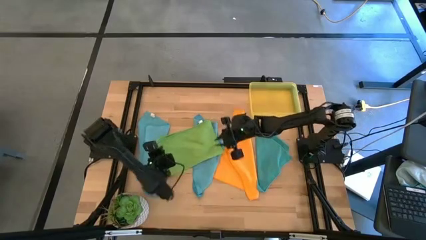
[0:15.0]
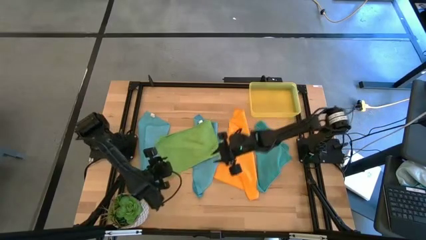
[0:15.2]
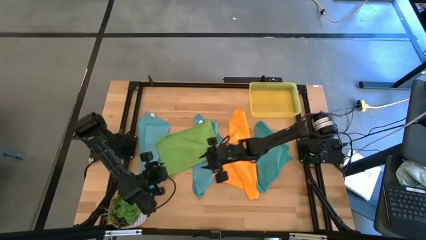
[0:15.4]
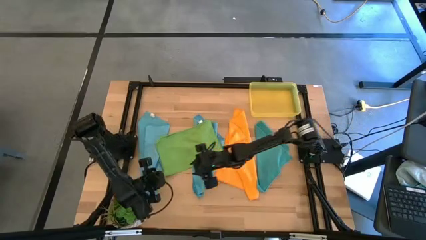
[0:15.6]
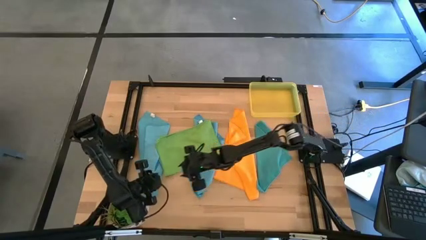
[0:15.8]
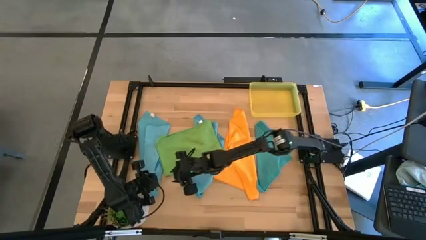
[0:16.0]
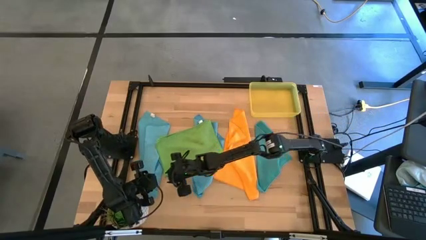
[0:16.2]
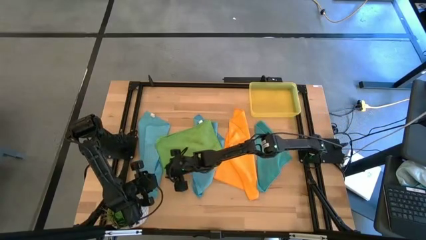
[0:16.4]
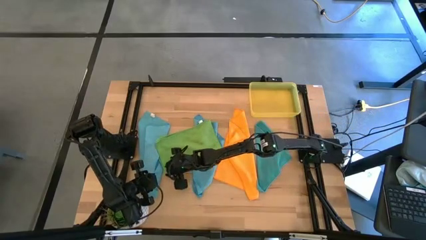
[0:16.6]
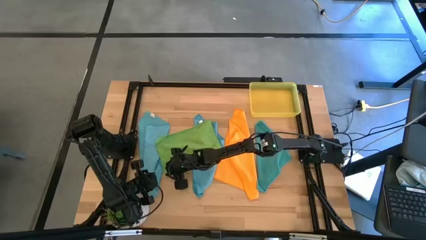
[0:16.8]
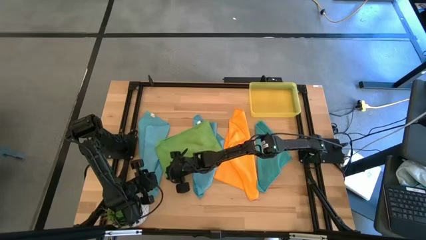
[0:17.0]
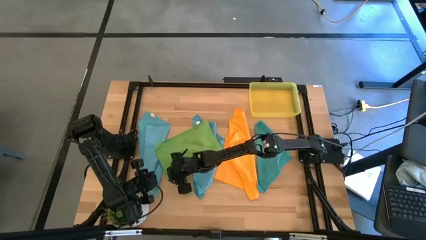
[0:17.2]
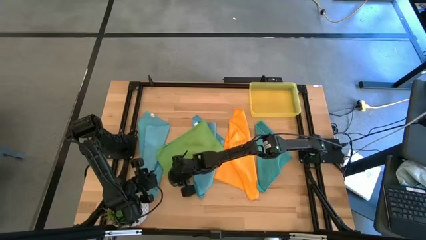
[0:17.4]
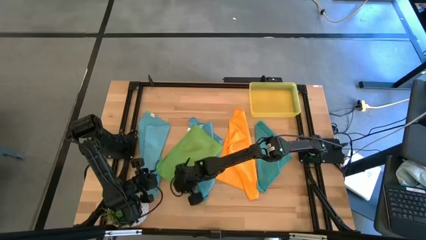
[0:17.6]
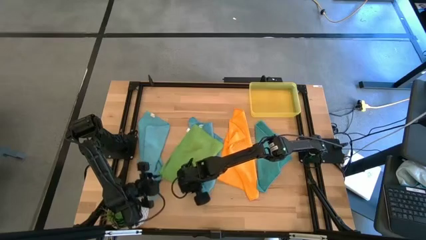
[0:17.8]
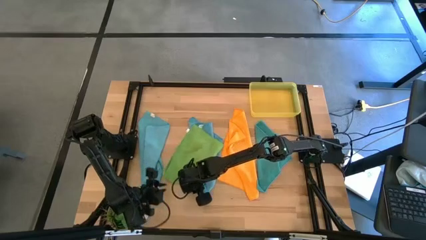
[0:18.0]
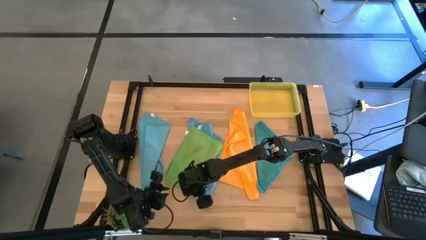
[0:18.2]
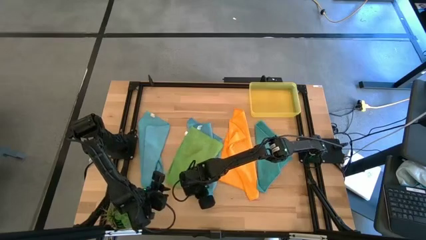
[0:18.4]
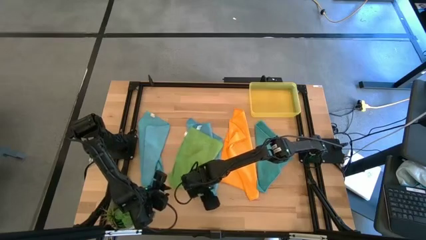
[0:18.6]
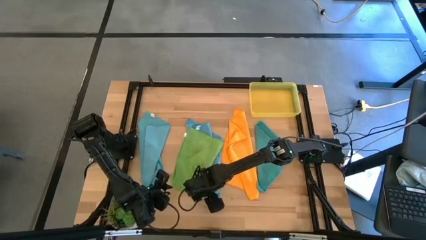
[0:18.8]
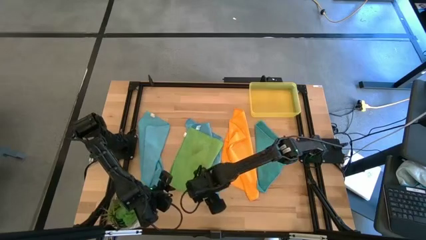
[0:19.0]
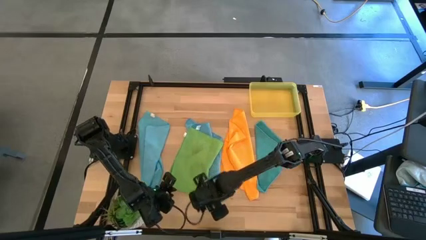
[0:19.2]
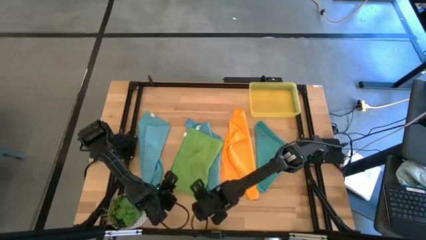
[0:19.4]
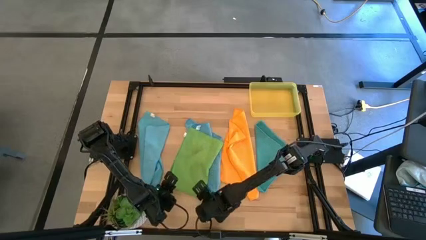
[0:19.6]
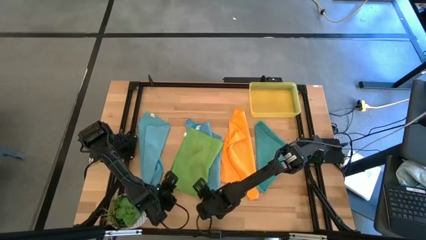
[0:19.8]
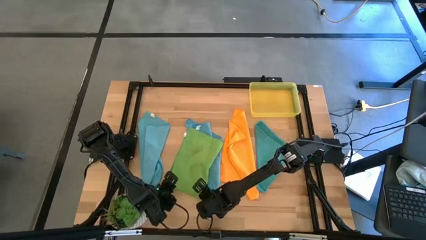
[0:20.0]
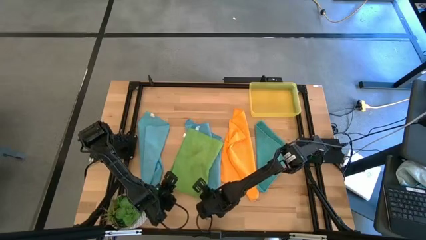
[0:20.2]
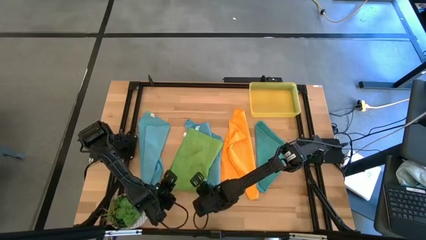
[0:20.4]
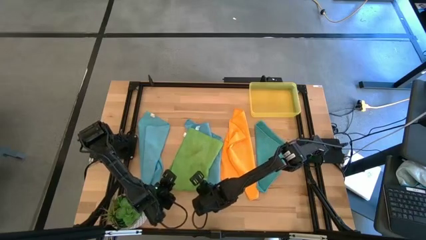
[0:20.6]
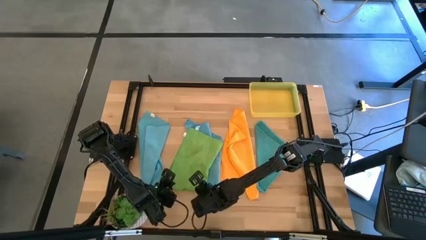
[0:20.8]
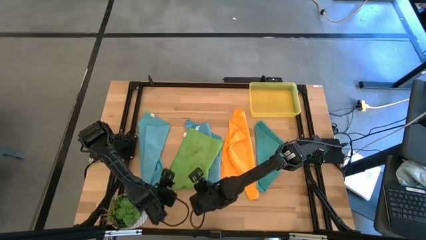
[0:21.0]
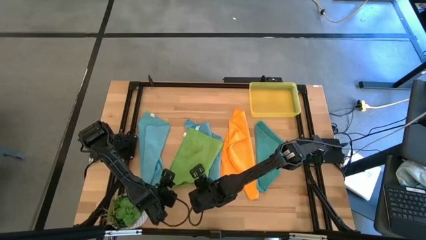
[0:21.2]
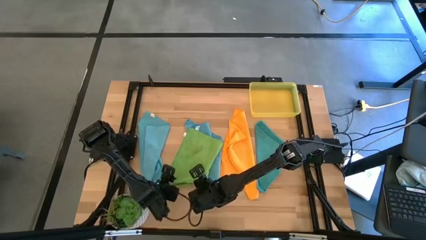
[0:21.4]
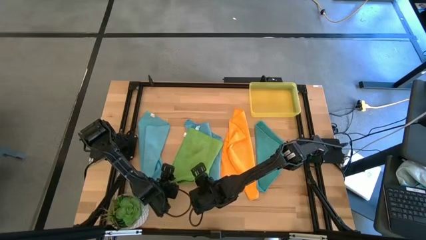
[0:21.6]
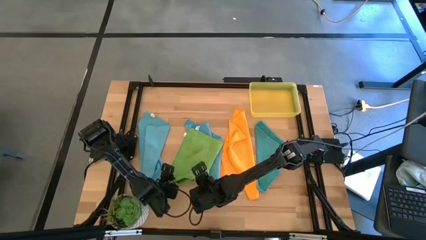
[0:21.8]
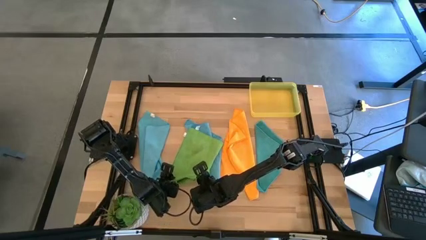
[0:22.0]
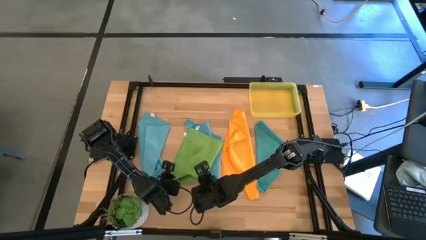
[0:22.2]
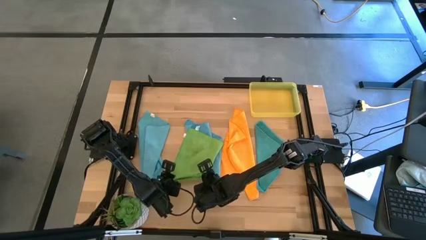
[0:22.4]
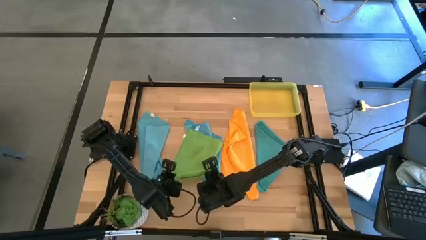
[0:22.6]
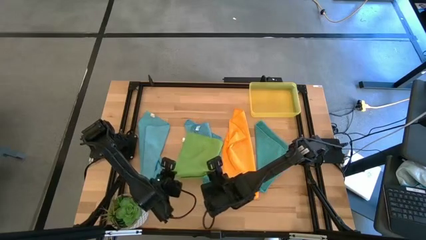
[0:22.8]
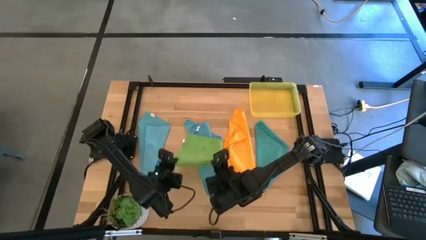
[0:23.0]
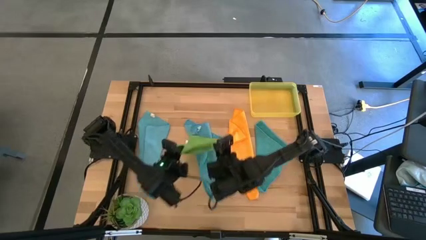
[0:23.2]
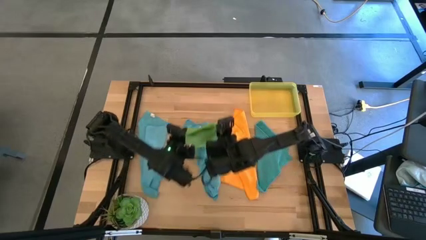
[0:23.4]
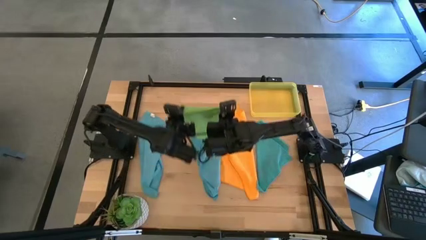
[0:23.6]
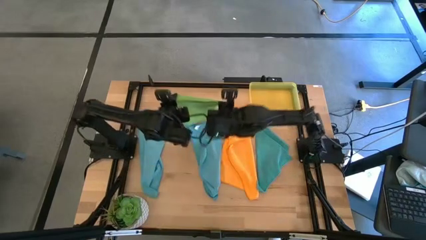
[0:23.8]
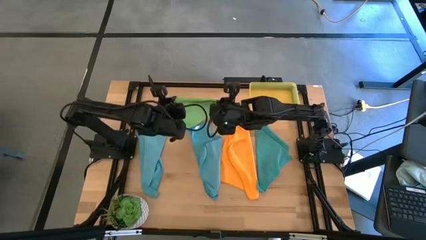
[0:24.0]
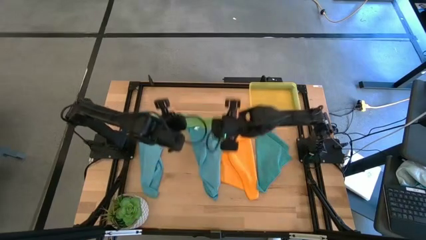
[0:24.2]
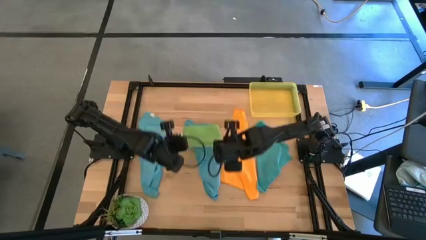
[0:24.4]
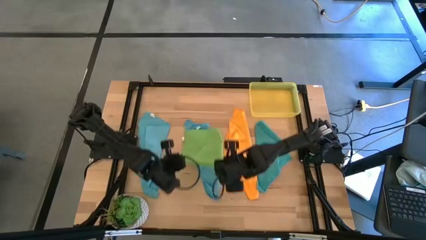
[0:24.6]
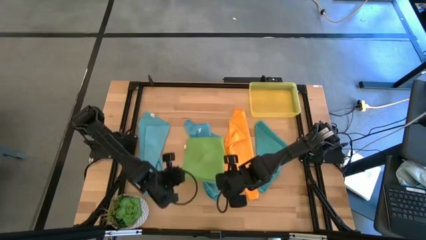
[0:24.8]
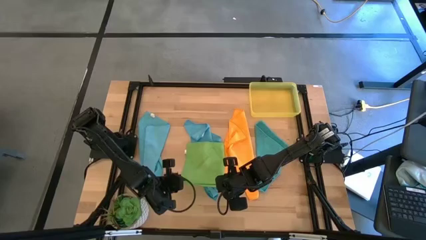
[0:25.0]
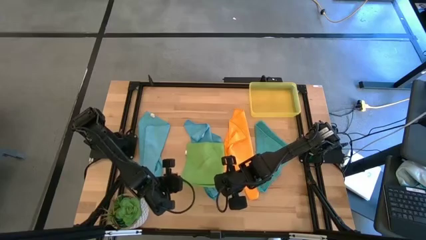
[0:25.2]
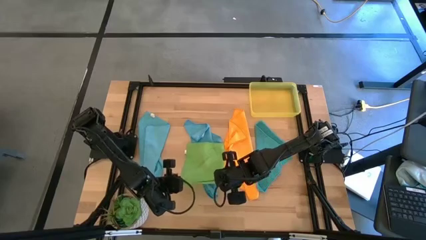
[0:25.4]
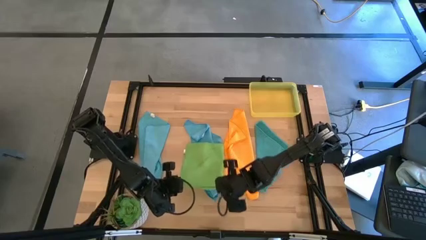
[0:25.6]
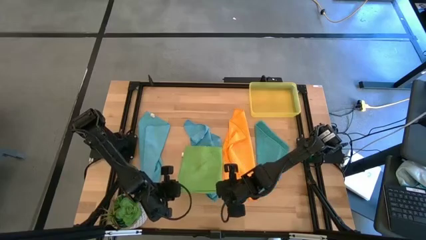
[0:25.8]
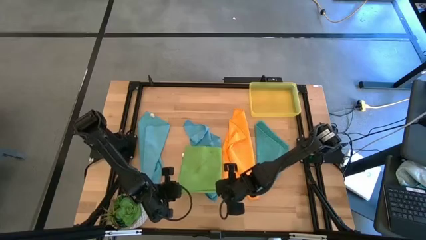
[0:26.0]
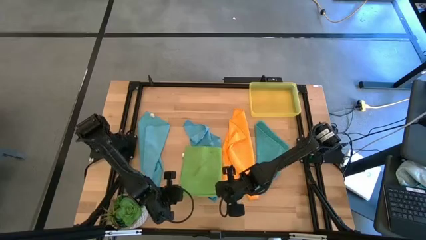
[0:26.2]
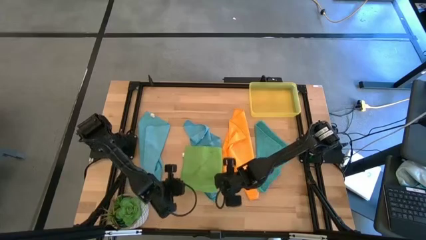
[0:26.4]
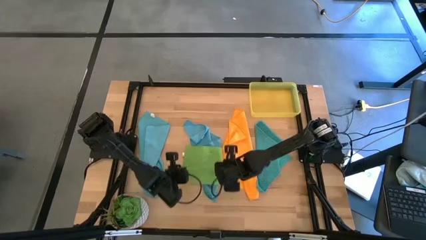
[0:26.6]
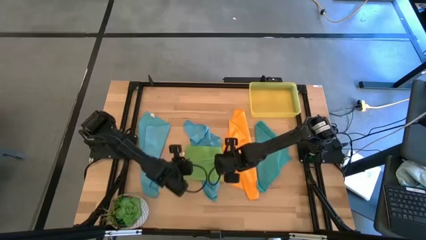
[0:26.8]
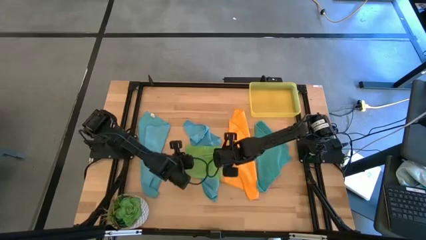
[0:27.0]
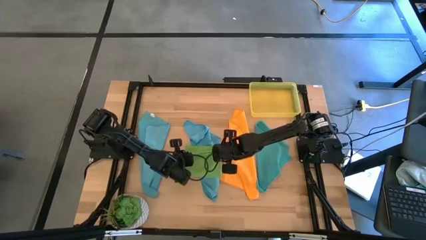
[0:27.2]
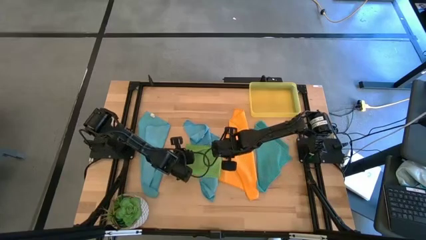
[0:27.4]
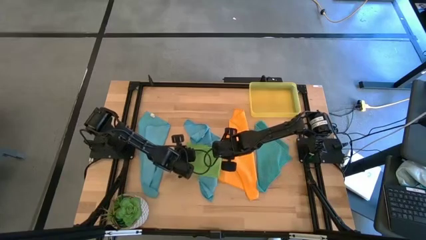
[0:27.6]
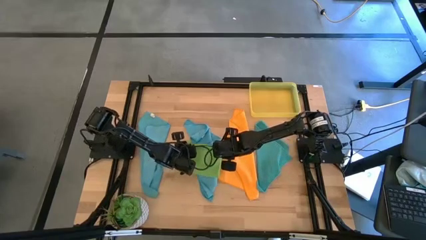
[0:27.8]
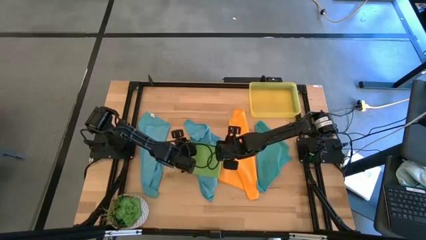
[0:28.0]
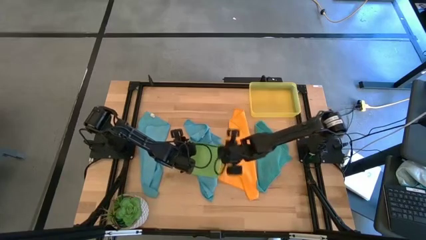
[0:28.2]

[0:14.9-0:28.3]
Task: Fold microfiber towels
Fold the green microfiber cloth

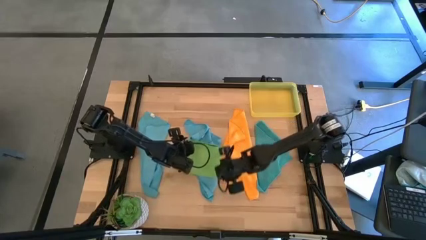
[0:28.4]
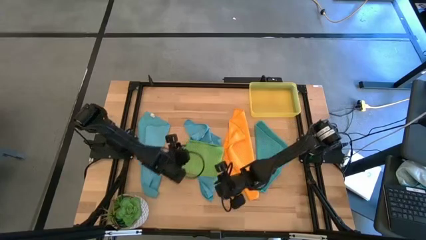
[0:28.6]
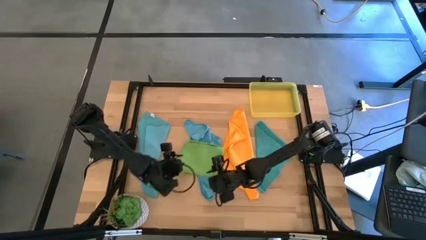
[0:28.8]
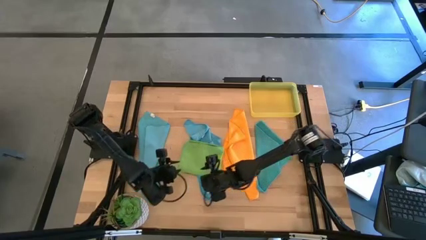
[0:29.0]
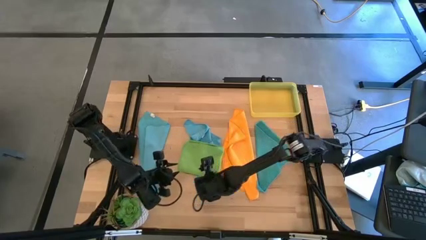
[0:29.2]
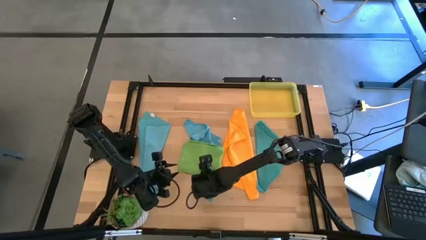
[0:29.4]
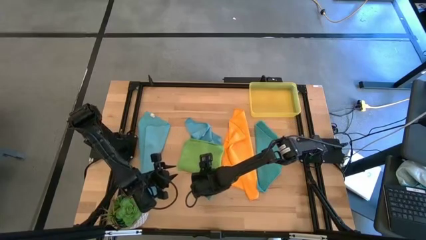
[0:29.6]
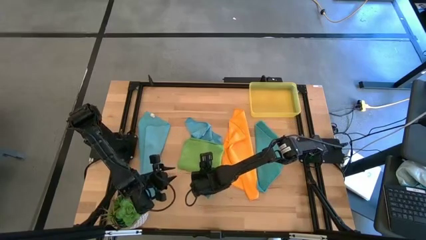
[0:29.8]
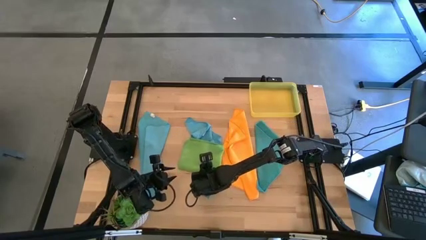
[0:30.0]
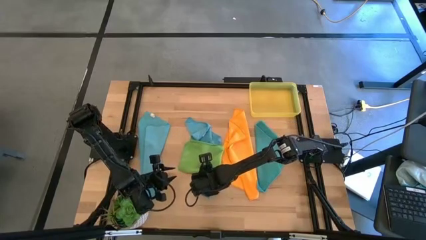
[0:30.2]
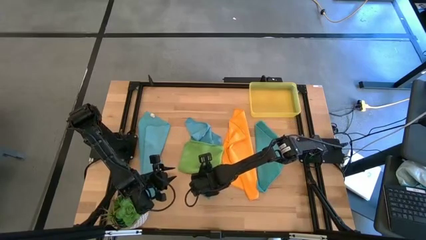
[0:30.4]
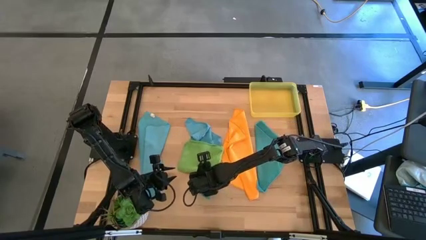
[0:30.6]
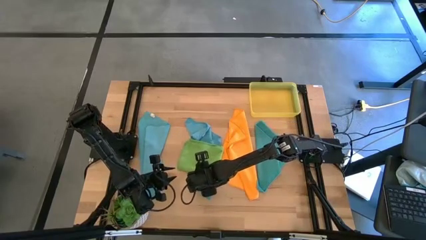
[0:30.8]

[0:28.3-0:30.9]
Put the folded green microfiber cloth into the yellow bin
